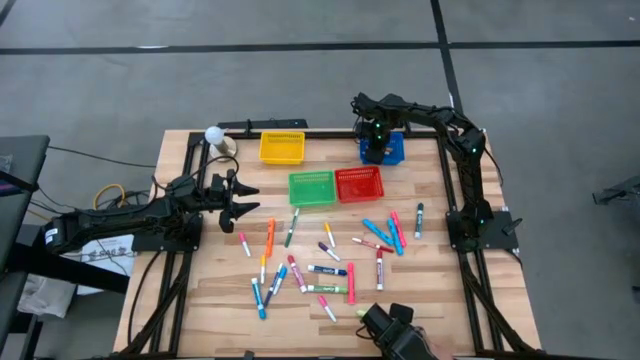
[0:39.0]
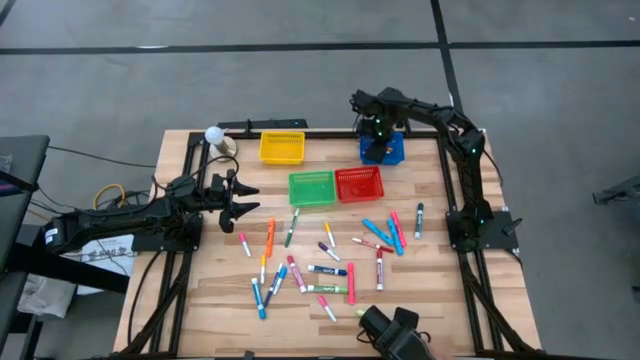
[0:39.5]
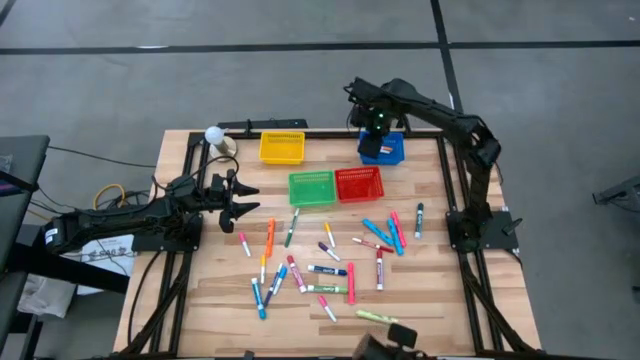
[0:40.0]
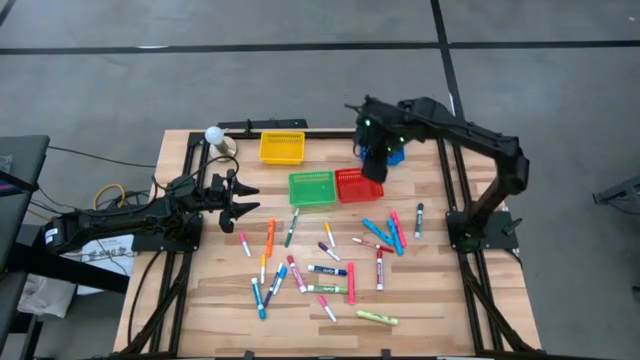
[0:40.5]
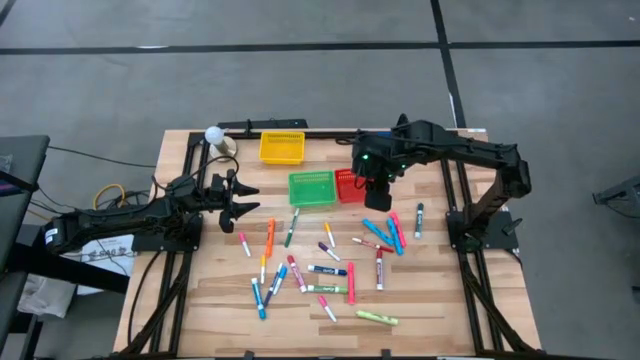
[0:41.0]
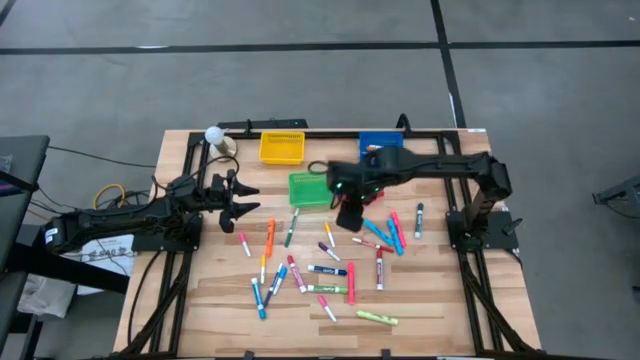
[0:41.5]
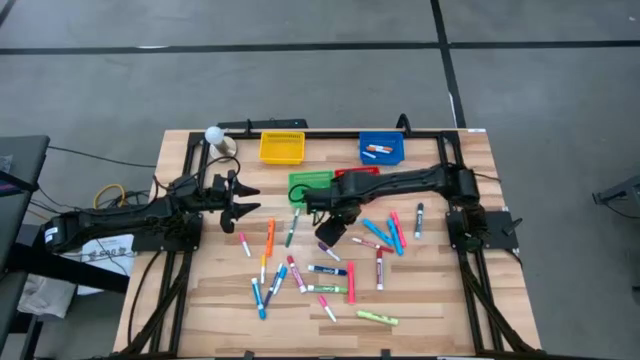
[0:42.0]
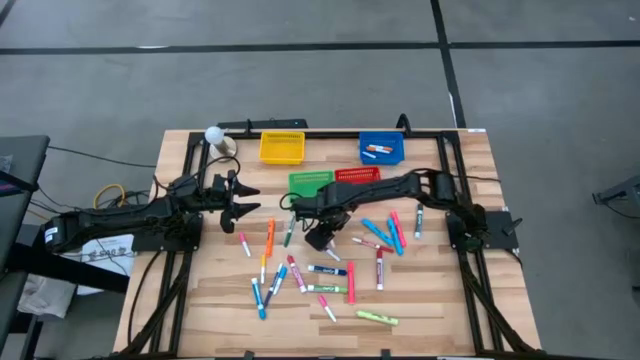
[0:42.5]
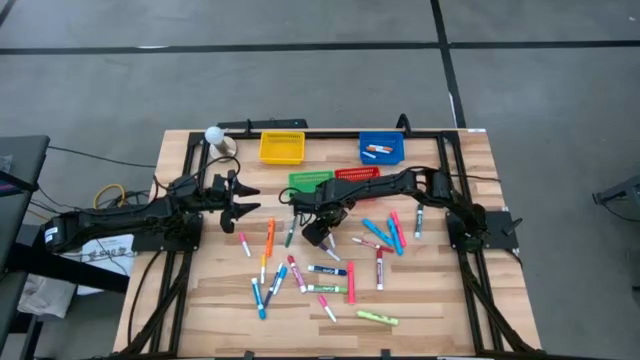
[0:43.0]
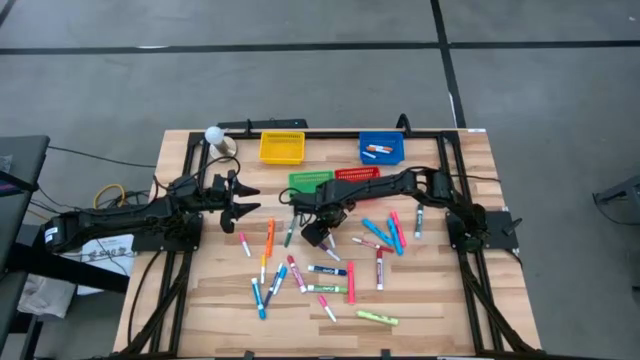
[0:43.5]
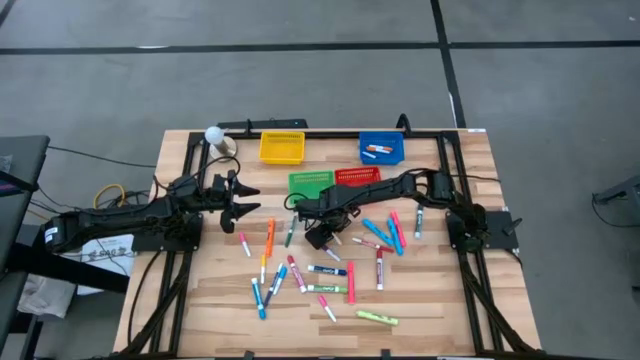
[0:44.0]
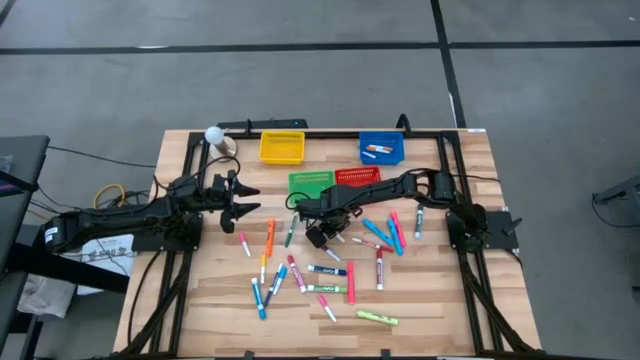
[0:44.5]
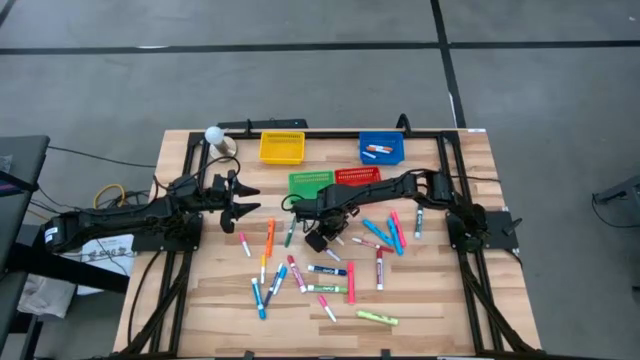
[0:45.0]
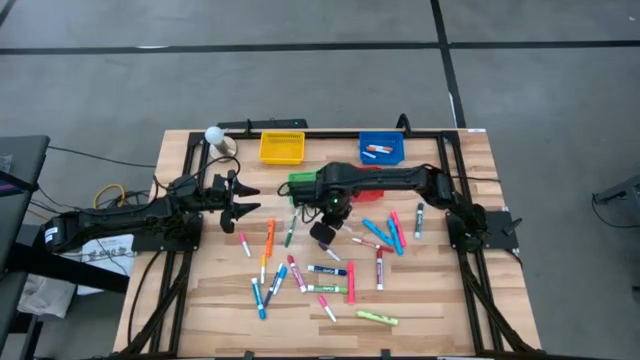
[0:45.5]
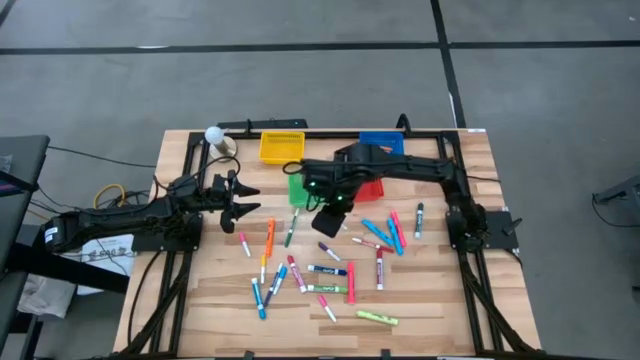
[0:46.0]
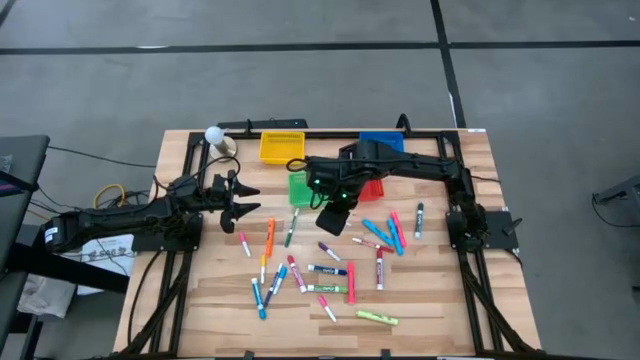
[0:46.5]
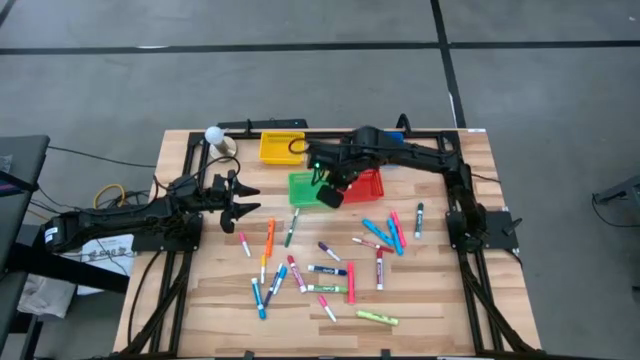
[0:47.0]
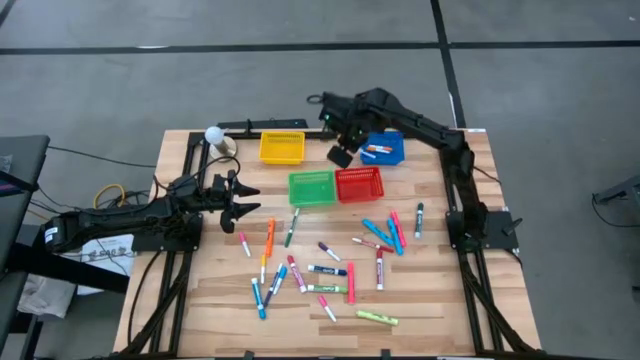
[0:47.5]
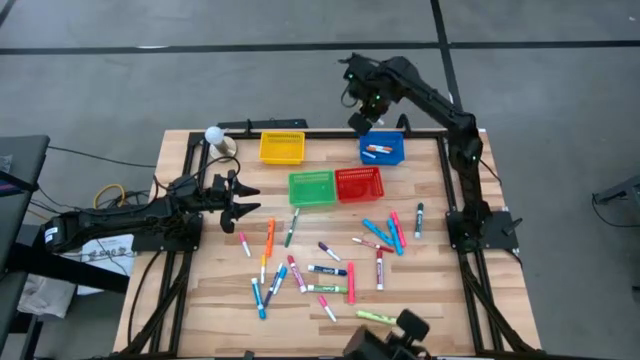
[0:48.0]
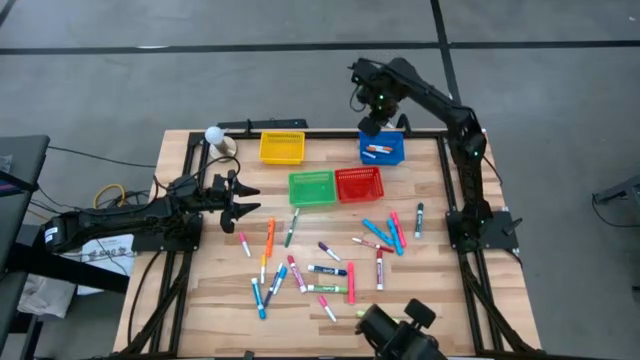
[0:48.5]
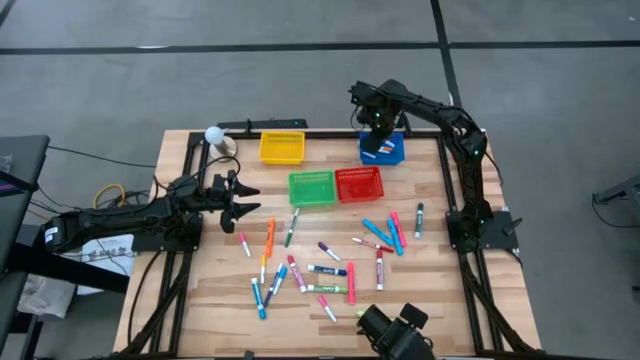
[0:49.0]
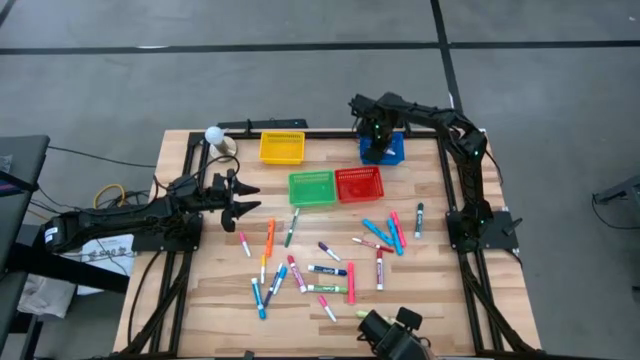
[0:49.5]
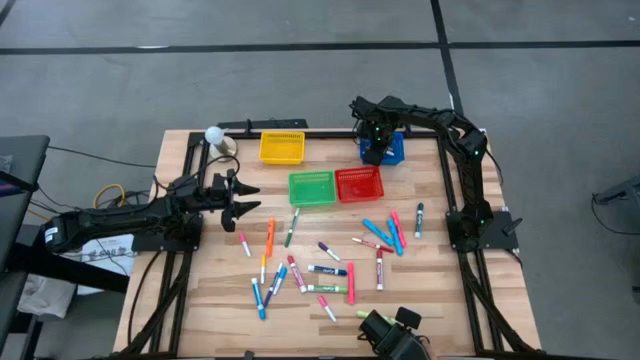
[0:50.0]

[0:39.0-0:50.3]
Task: Pick & Place Markers
Put the right yellow highlighter pen into the blue bin

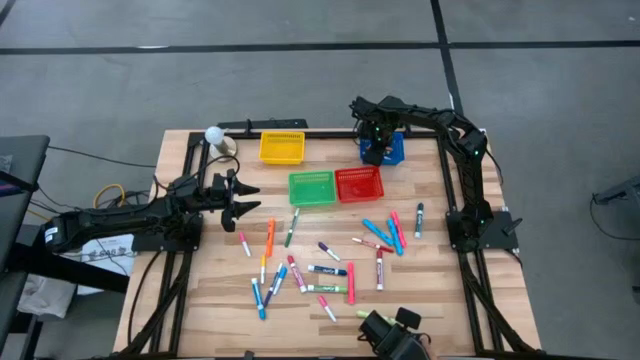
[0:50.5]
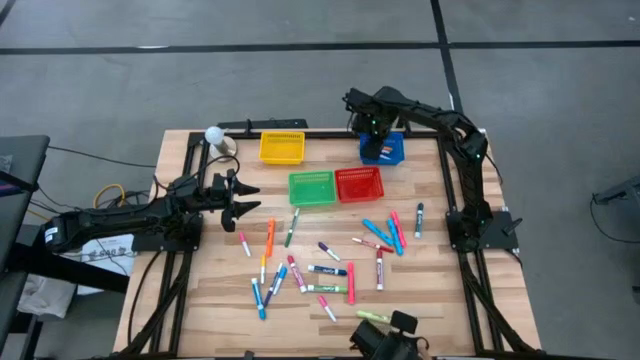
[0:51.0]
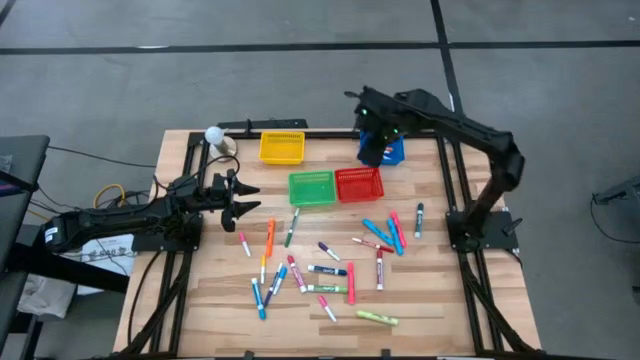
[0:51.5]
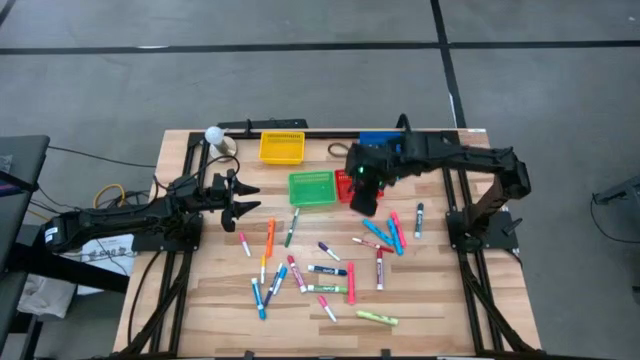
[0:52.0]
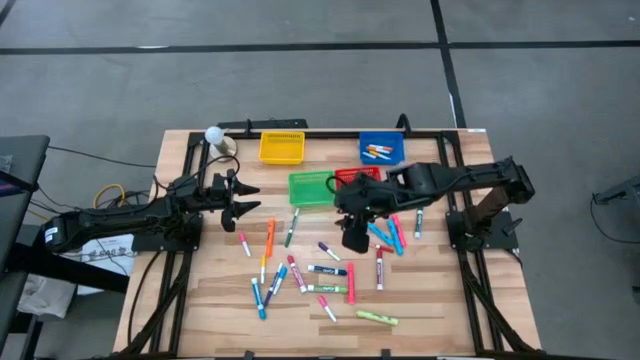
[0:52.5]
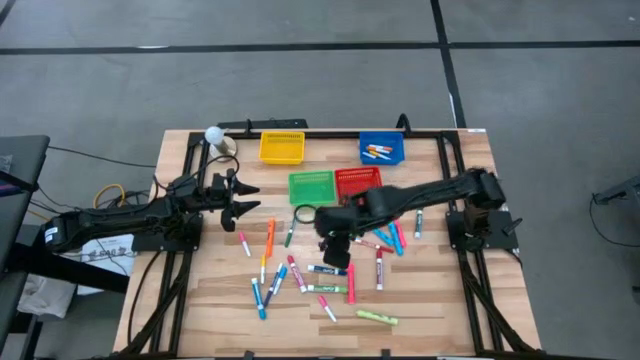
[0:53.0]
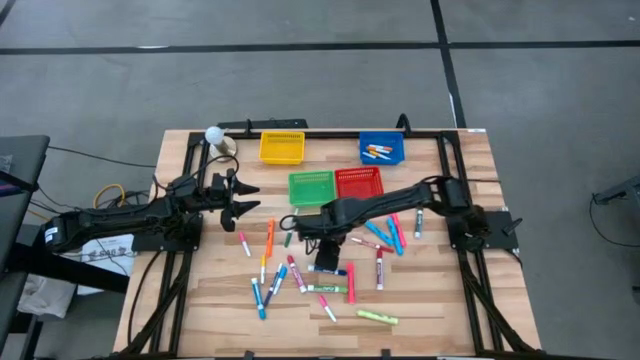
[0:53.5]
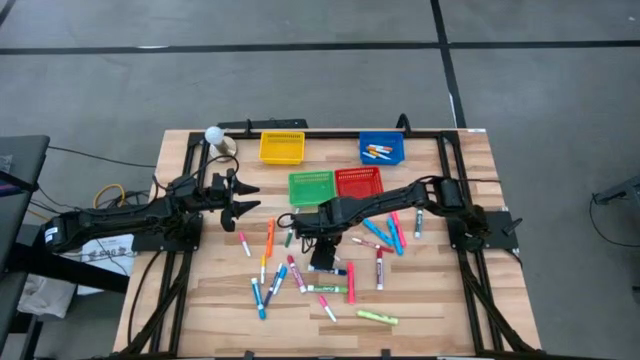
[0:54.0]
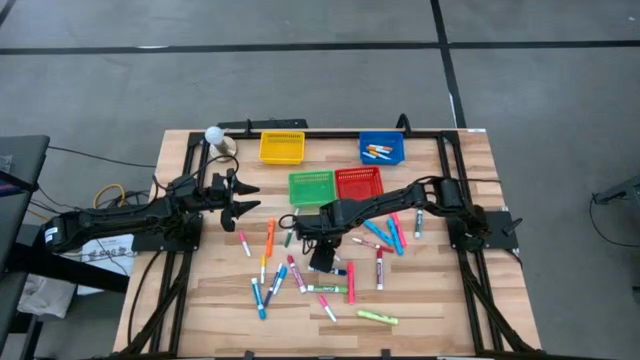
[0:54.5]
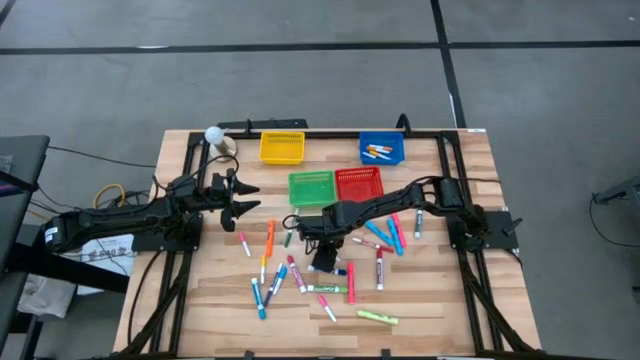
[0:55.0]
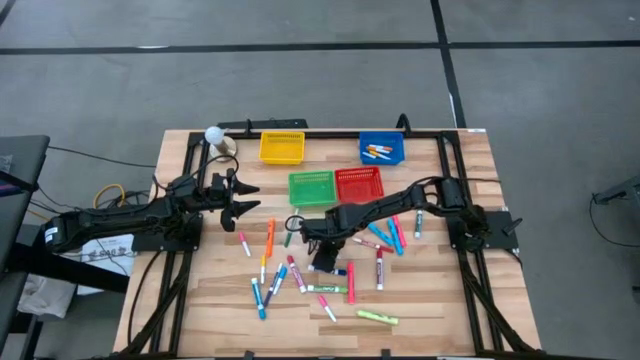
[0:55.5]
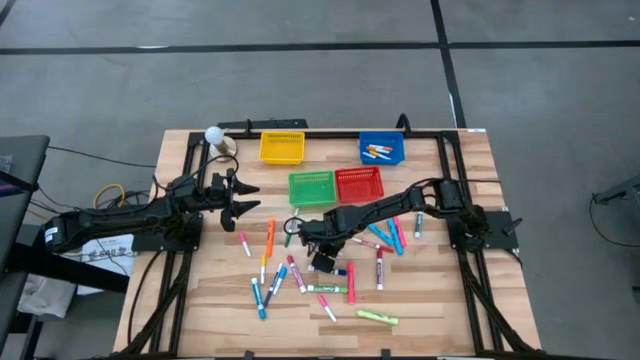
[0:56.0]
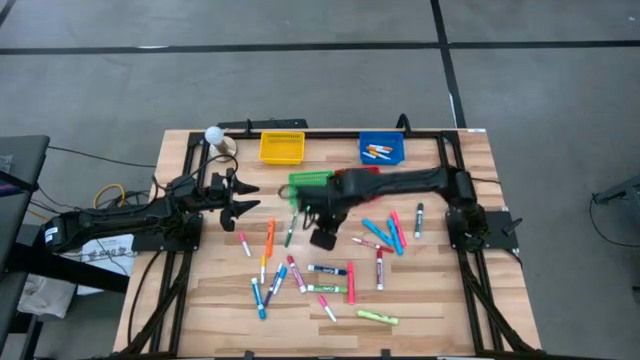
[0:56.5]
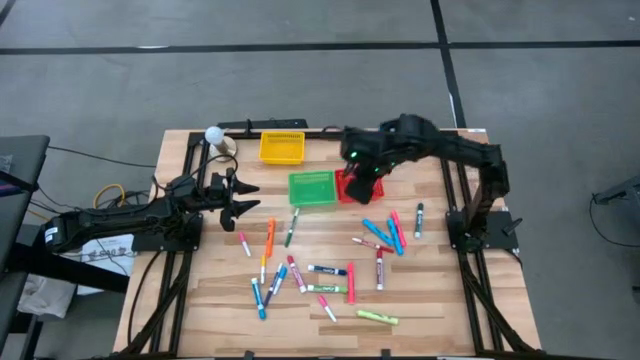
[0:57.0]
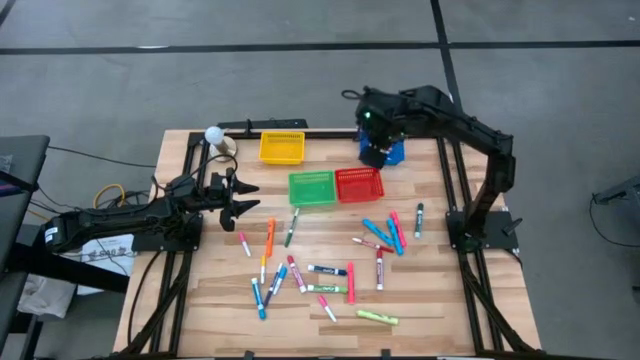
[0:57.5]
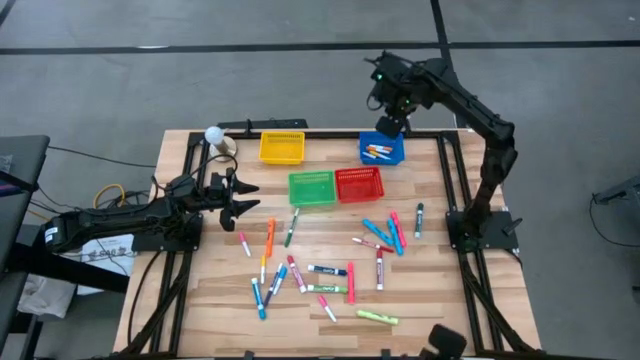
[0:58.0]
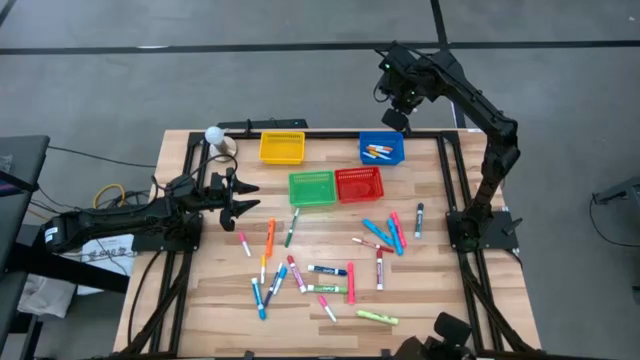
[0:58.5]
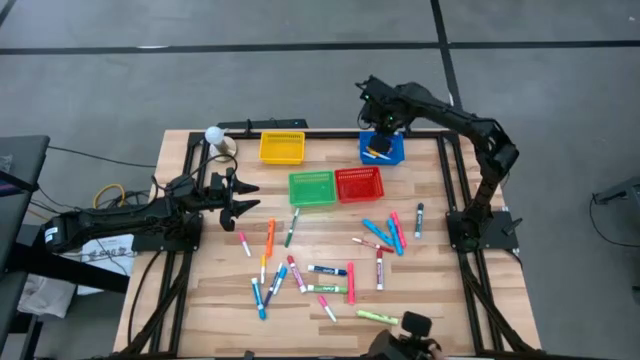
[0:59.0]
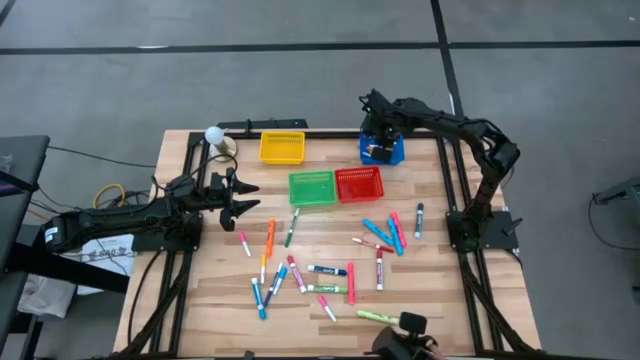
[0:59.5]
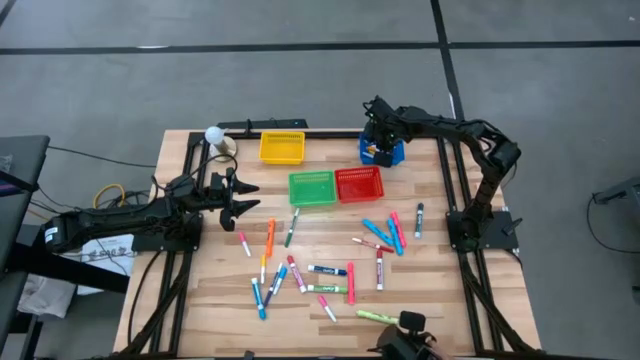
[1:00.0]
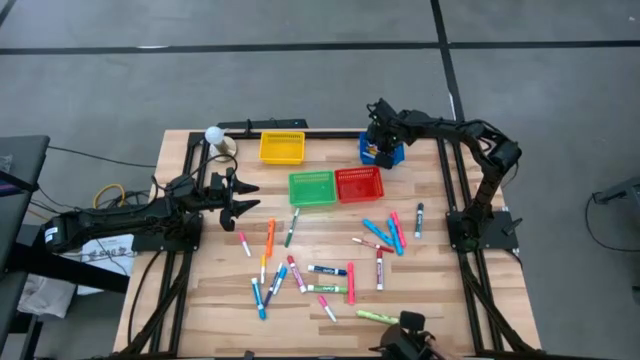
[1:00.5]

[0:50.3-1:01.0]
Put the violet highlighter pen into the blue bin
